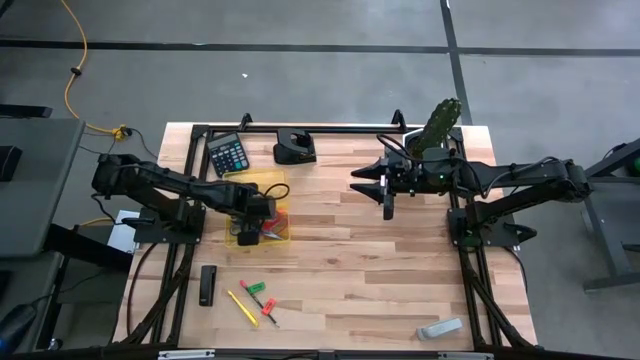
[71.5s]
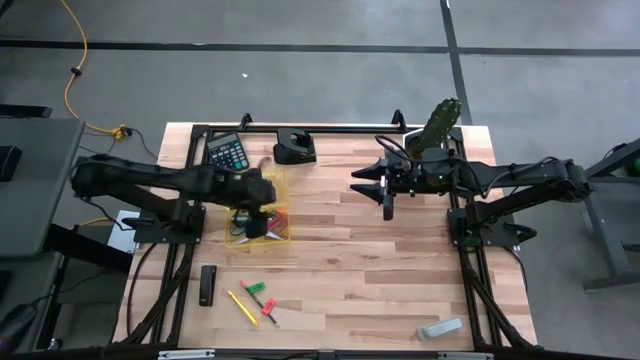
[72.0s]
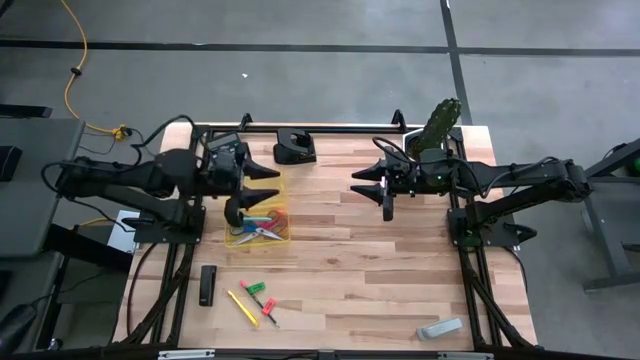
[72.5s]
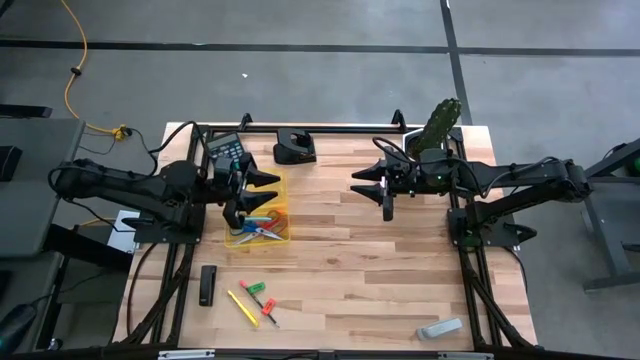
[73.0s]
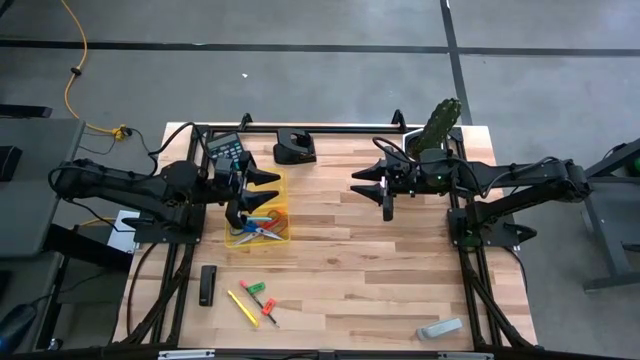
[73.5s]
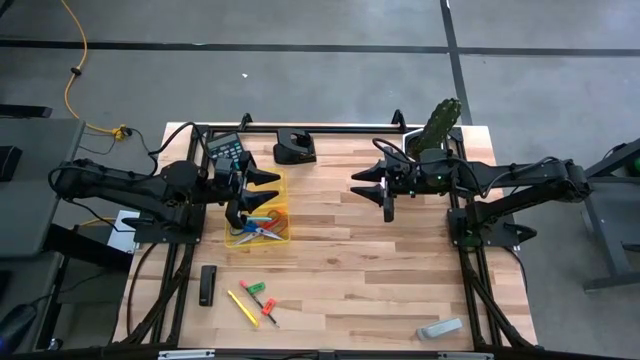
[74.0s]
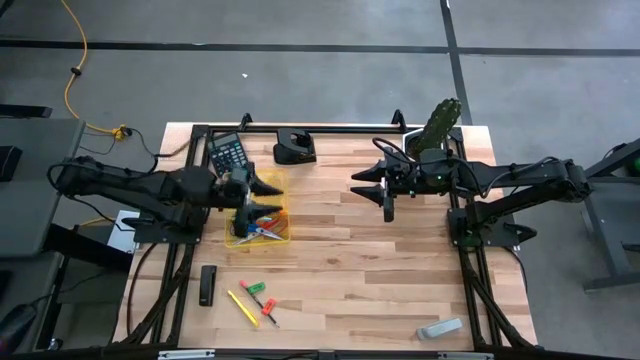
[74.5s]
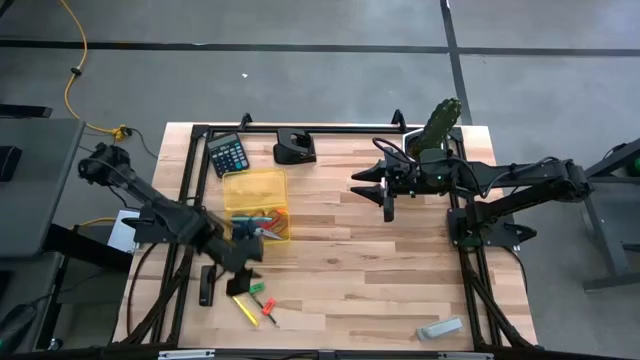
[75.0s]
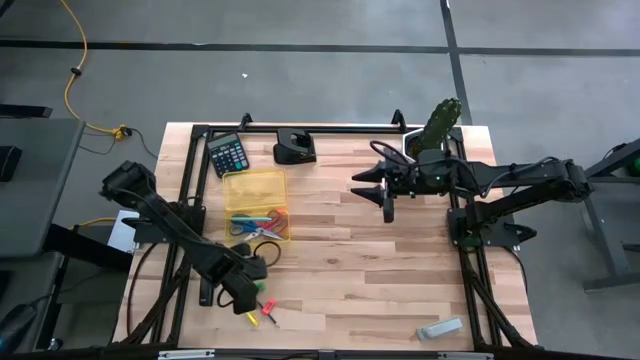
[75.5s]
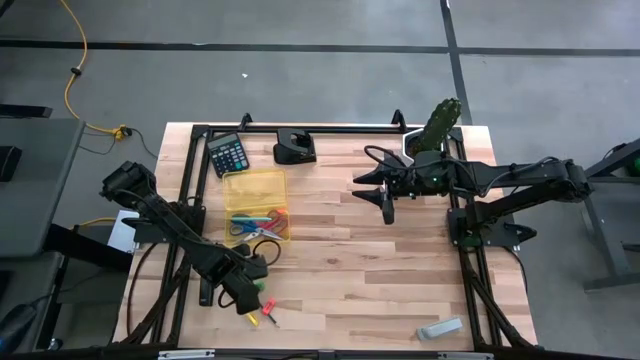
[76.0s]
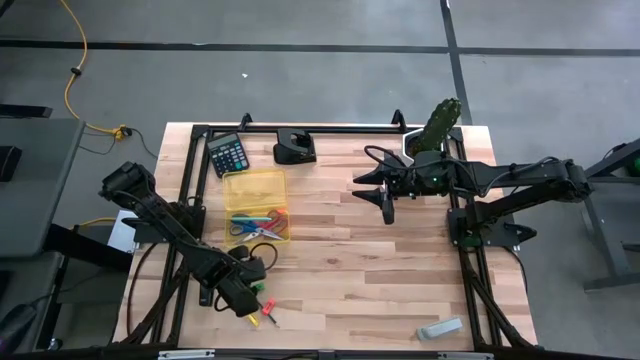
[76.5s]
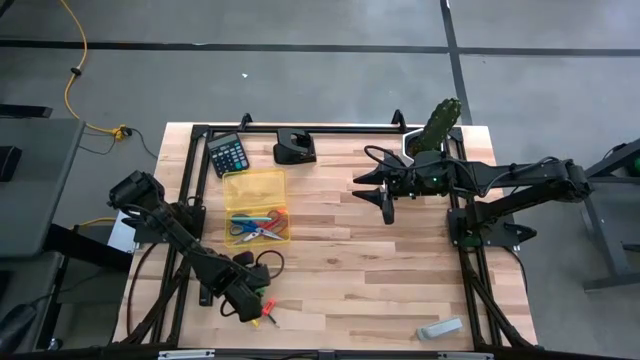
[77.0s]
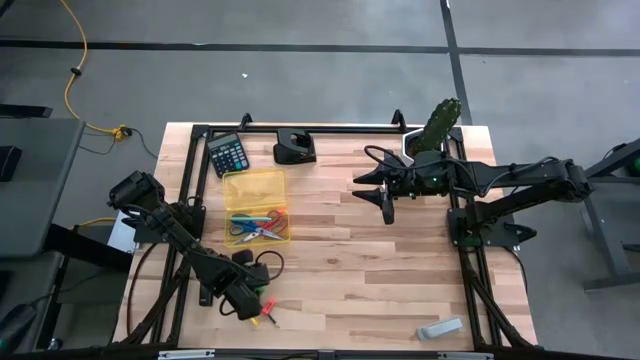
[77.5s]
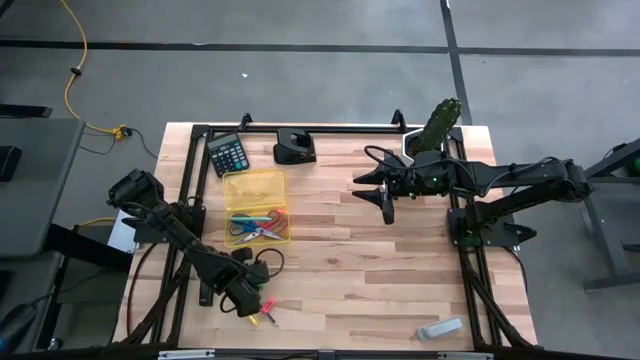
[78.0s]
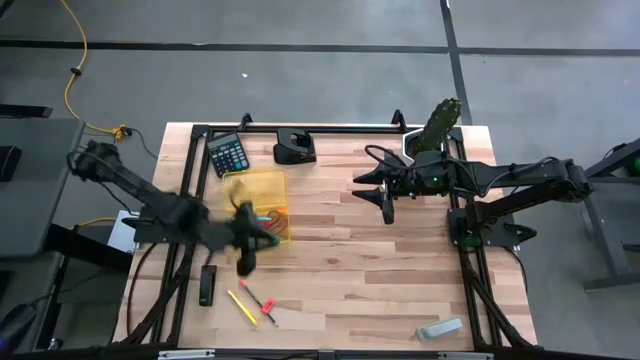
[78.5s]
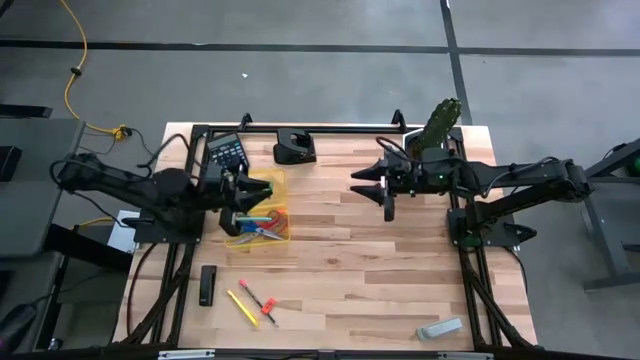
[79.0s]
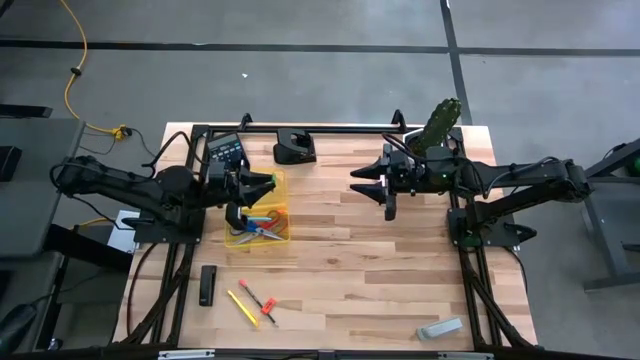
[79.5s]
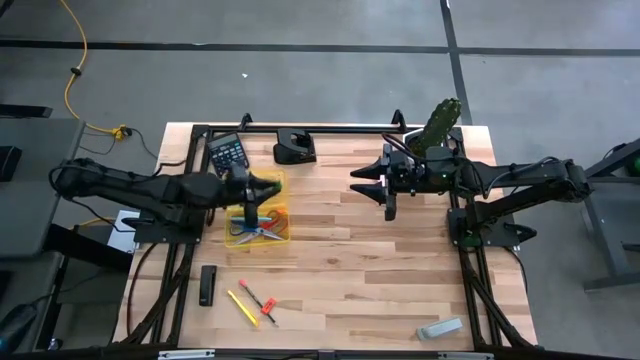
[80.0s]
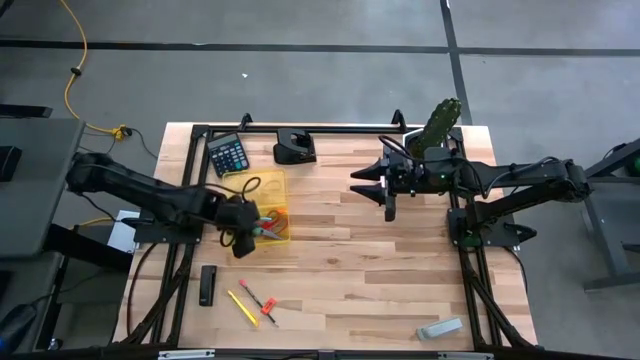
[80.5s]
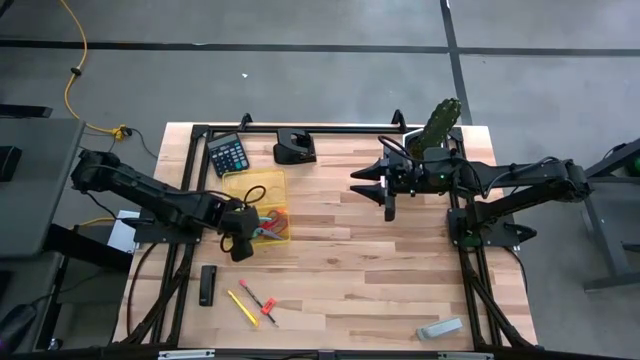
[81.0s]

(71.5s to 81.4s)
Task: Pack school essentials
Put the green eraser into the yellow supply box

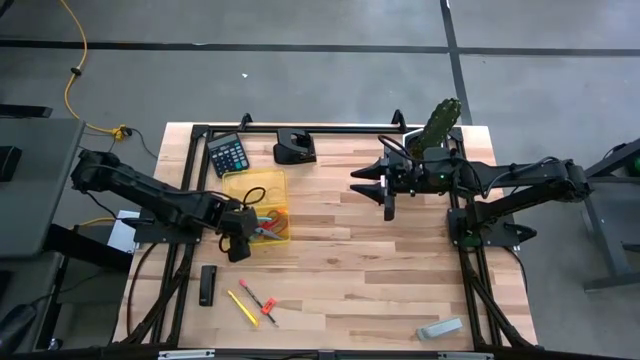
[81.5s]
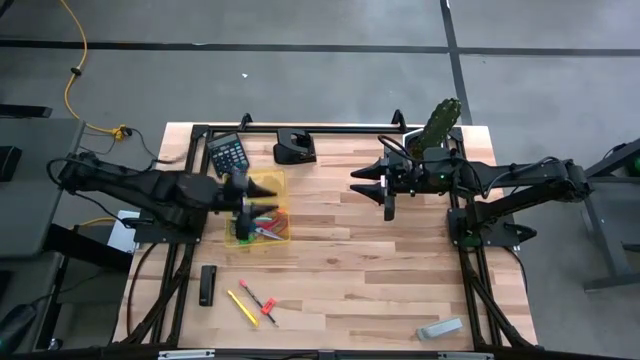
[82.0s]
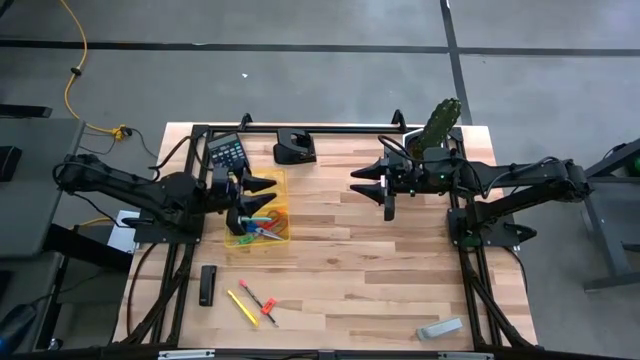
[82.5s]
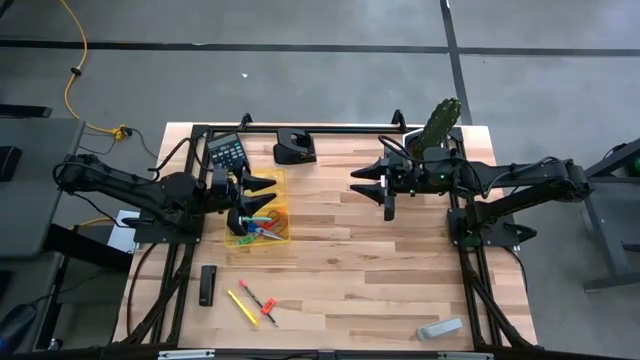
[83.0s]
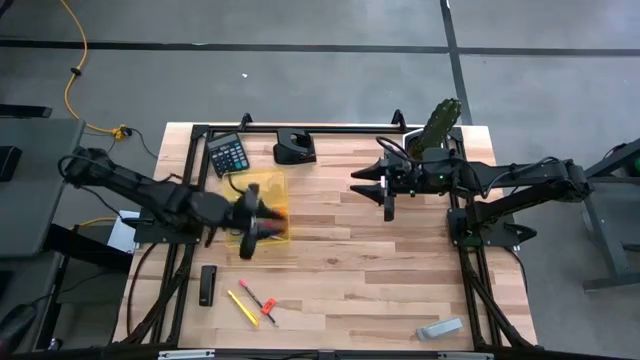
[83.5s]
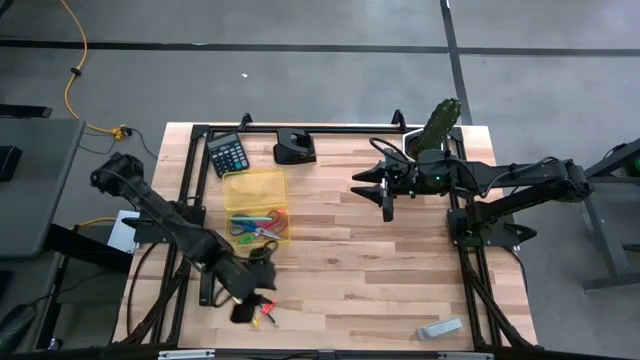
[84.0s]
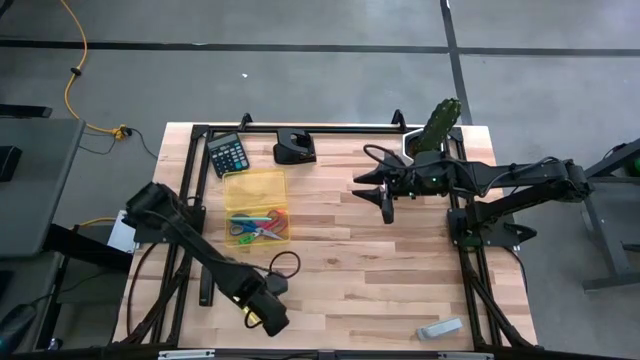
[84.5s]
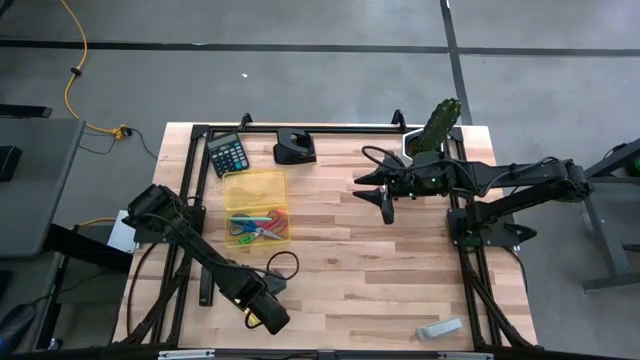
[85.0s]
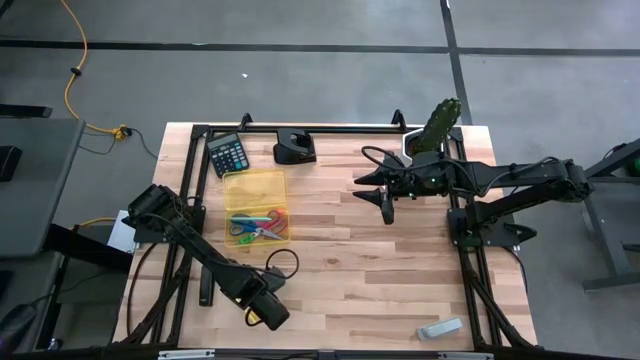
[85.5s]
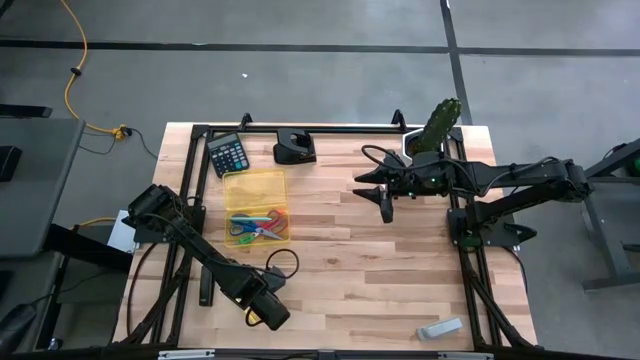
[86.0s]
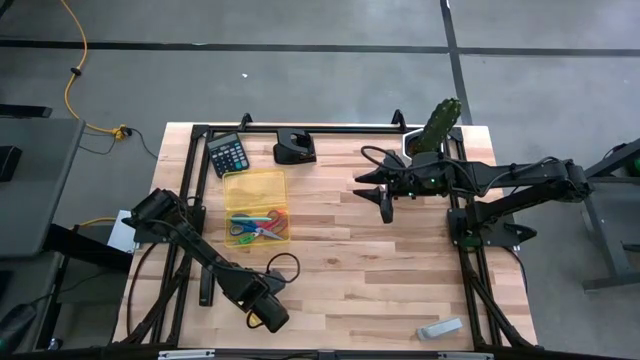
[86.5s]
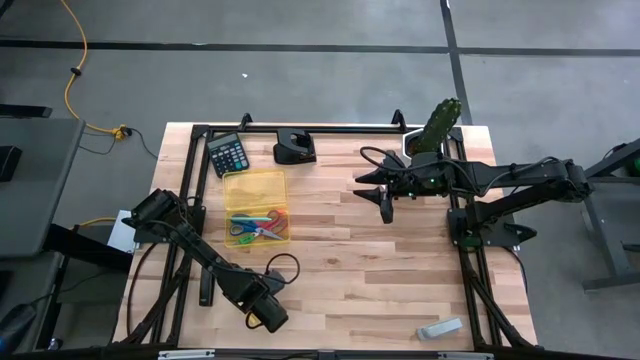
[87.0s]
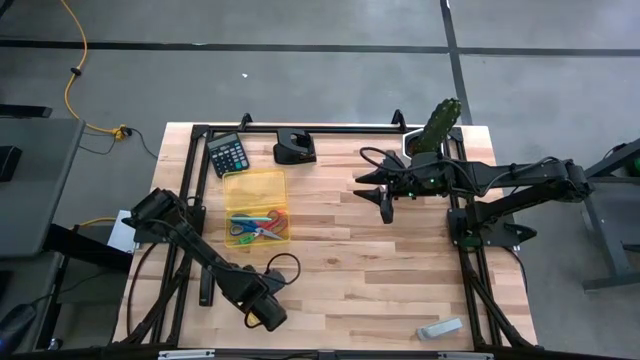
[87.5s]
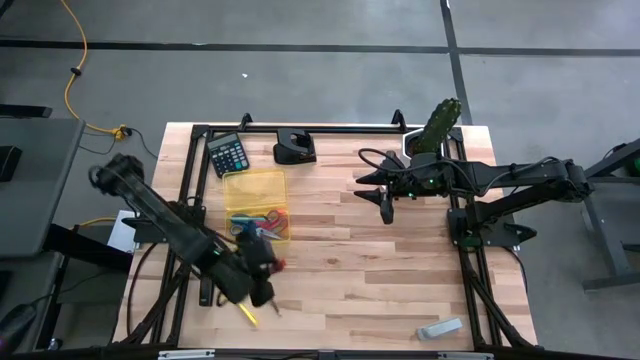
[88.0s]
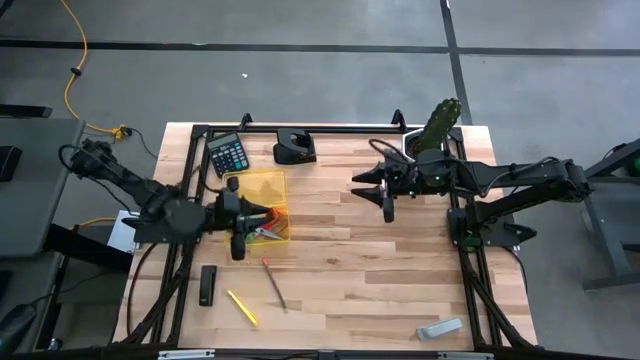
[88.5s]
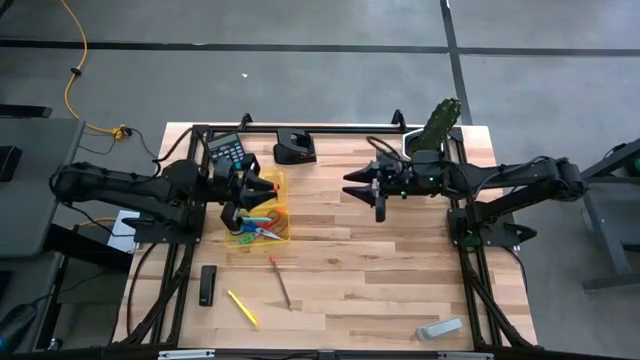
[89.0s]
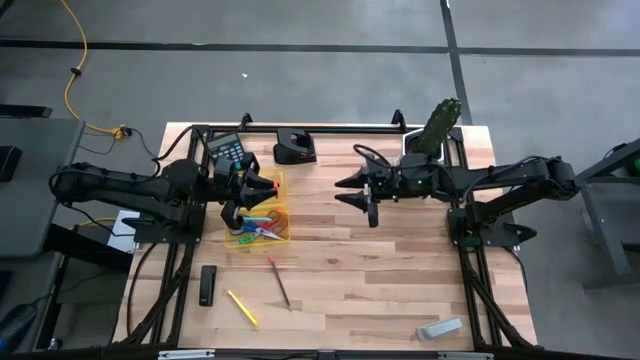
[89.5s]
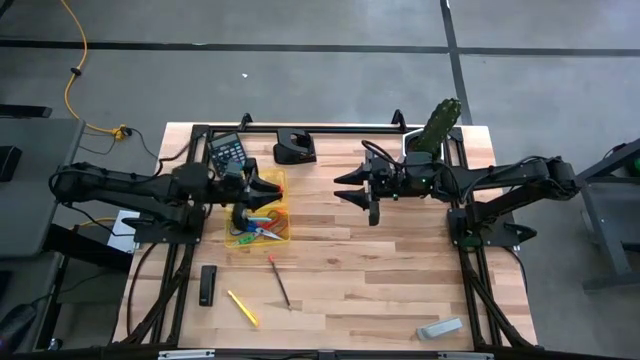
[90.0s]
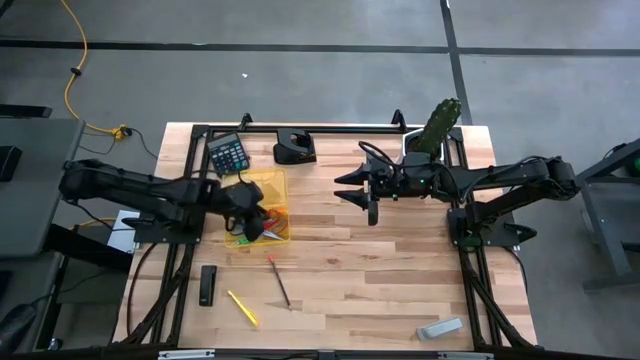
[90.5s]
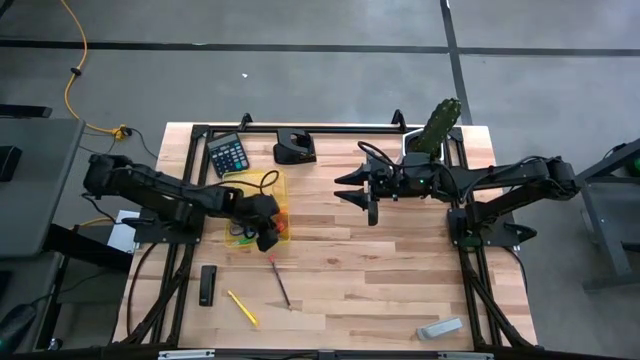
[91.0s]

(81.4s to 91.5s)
Put the orange eraser into the yellow supply box

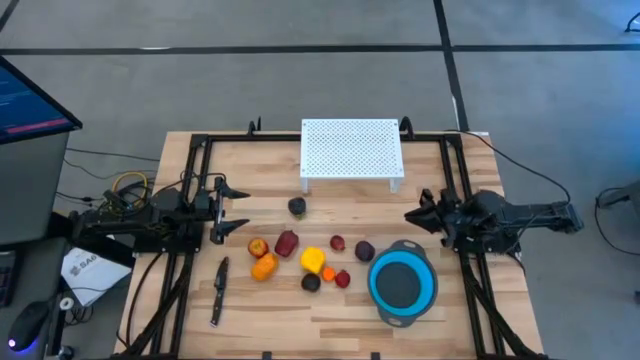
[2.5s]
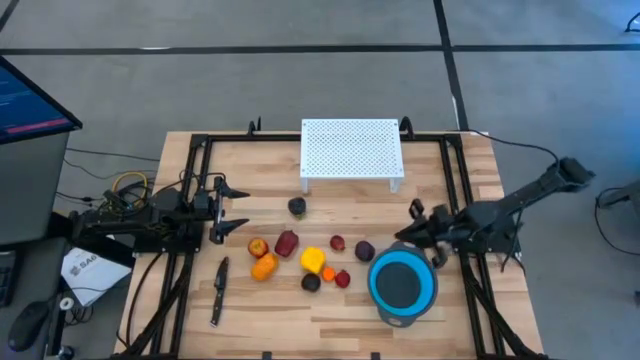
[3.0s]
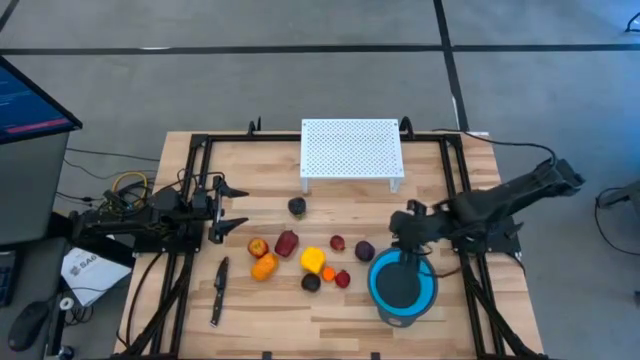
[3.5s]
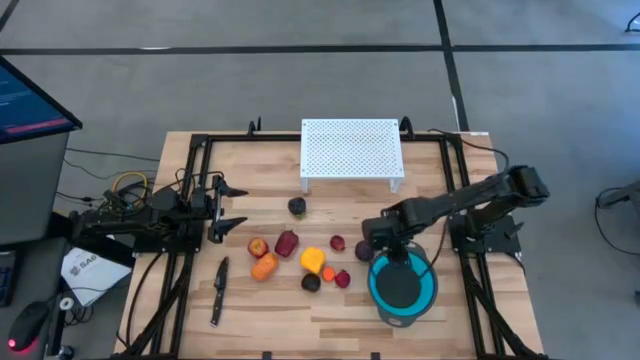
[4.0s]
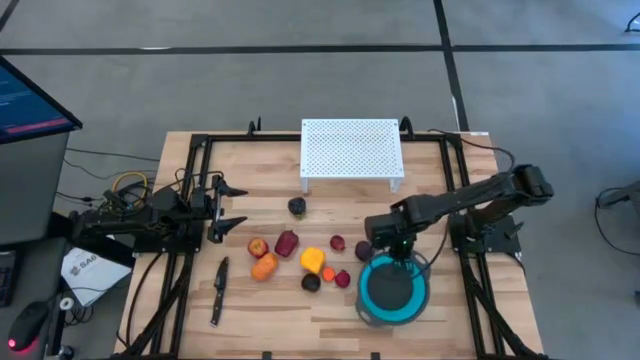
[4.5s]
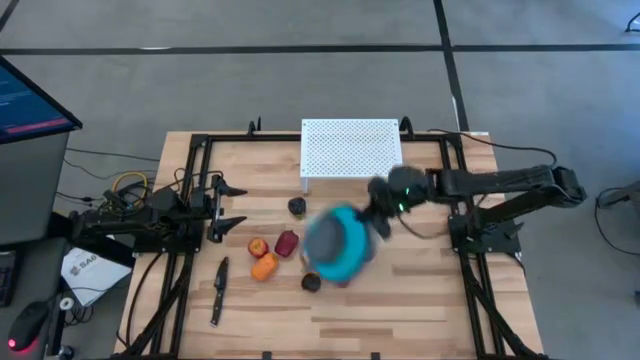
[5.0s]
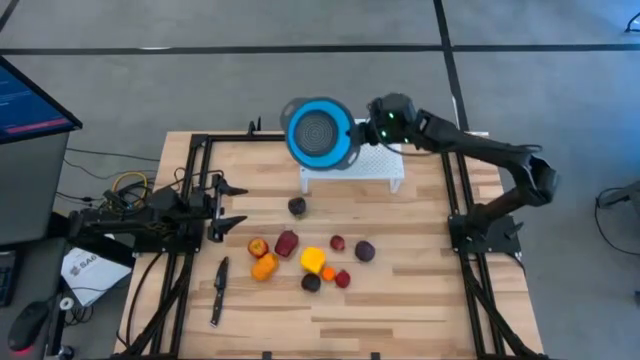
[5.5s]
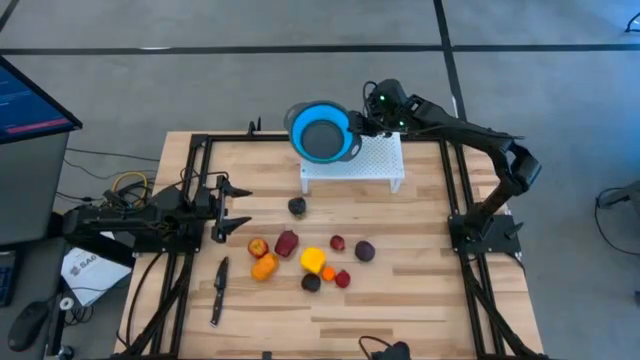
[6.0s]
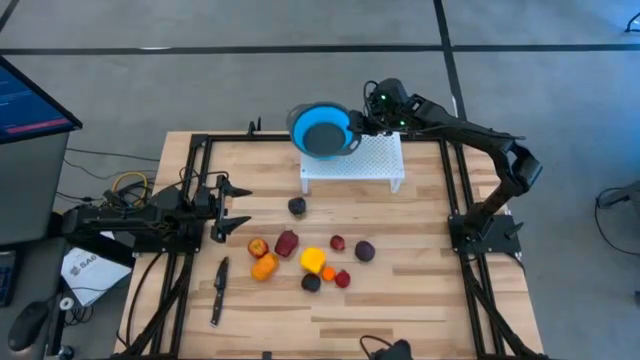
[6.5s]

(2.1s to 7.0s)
Task: Pick & Place Fruit
Put the blue strainer bowl on the shelf
